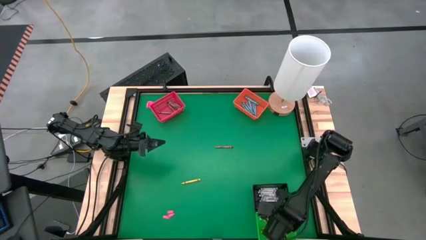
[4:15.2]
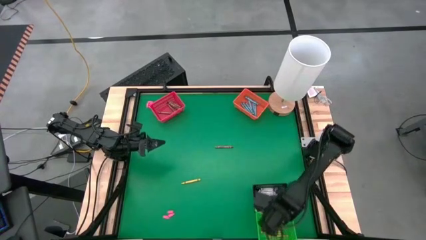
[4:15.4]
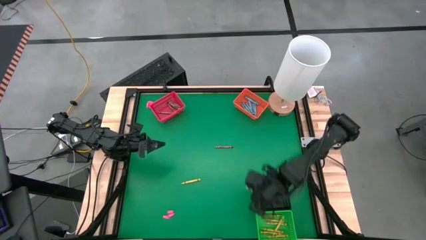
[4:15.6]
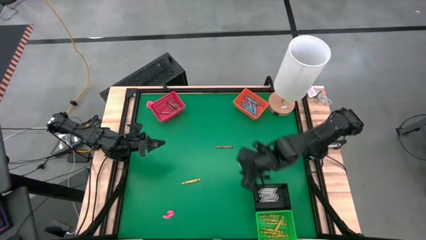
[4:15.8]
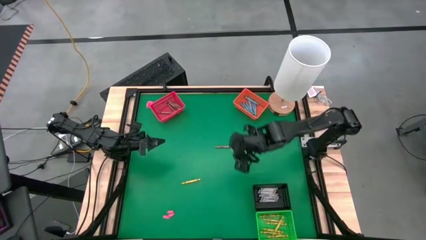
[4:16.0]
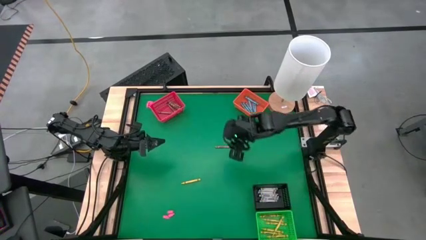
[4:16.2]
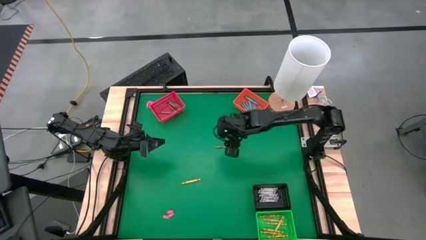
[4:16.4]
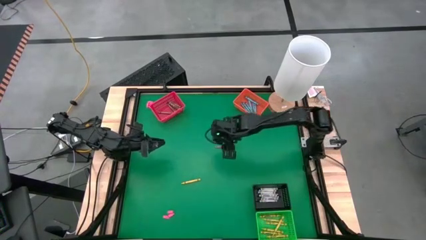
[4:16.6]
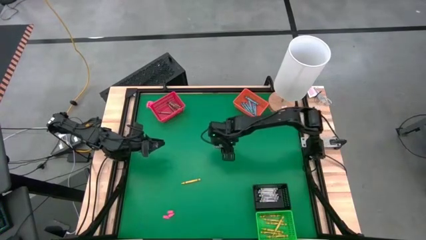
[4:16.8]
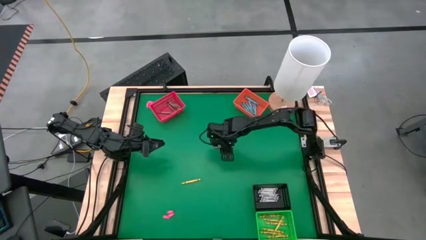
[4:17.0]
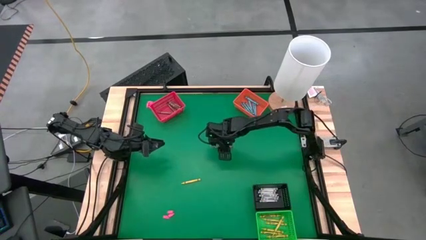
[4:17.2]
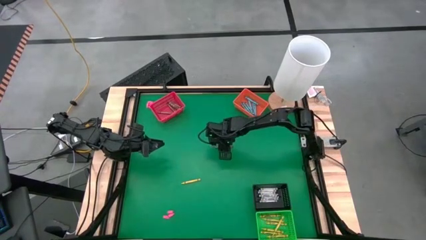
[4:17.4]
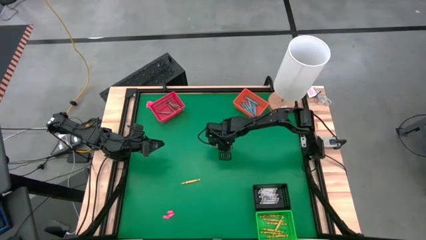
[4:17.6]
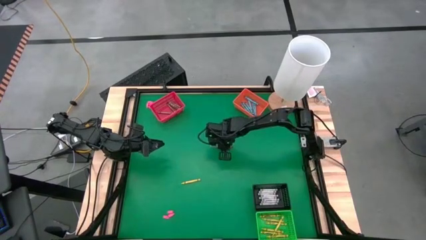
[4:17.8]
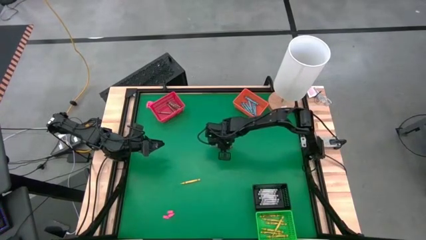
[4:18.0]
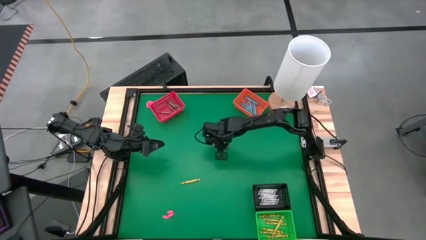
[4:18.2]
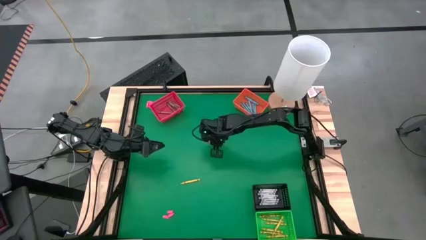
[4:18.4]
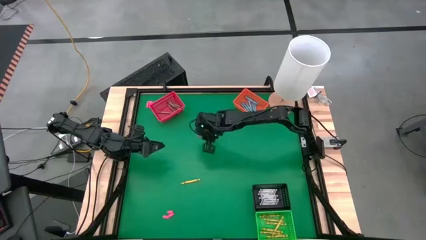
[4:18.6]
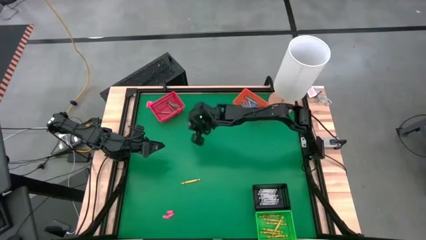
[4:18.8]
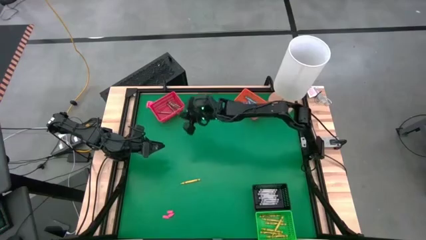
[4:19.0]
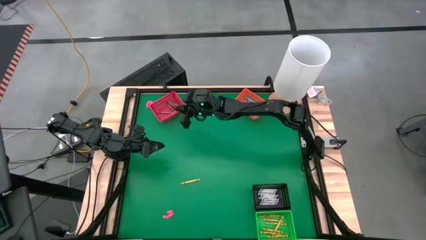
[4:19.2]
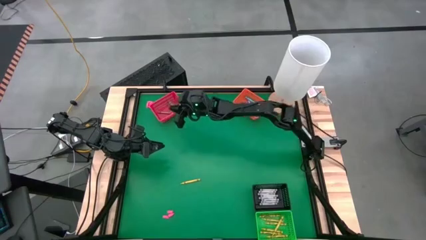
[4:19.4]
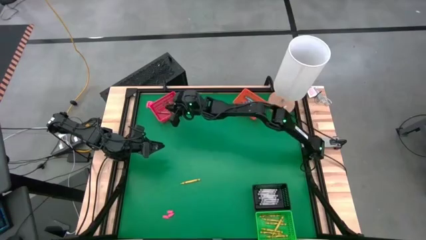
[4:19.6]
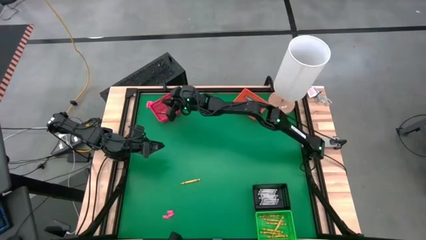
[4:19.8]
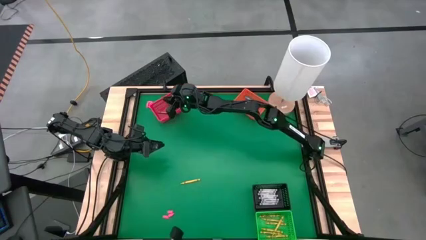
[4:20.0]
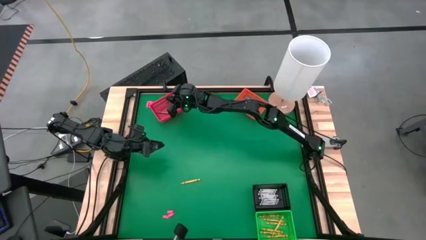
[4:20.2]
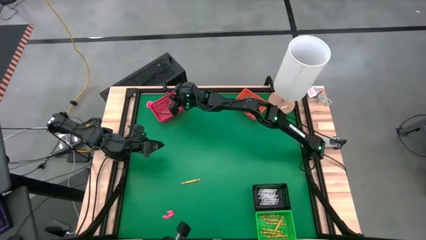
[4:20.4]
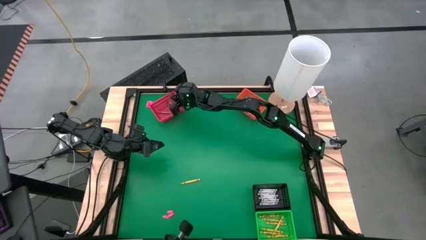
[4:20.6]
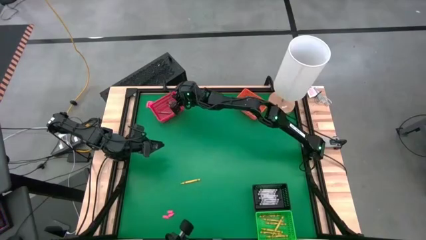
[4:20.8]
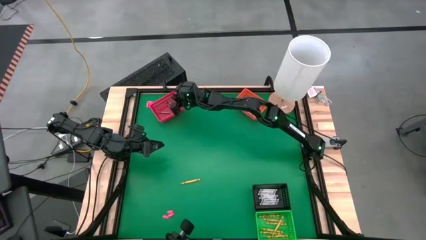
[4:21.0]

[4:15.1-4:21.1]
Task: Sort crayons
Put the brown crayon into the red bin

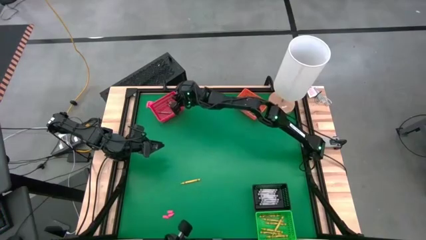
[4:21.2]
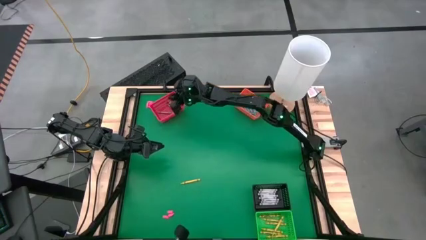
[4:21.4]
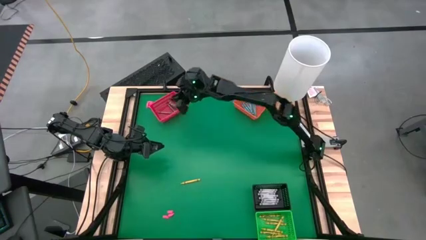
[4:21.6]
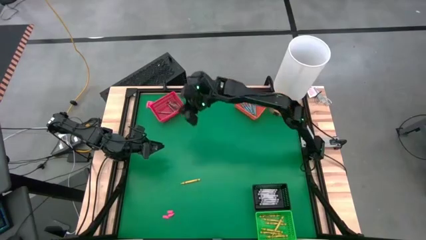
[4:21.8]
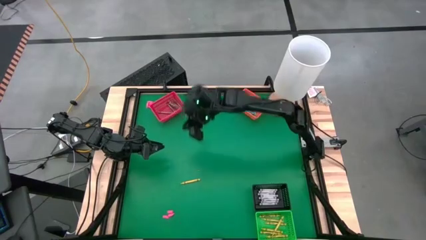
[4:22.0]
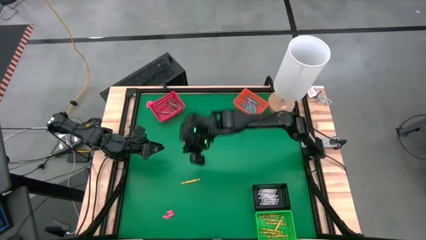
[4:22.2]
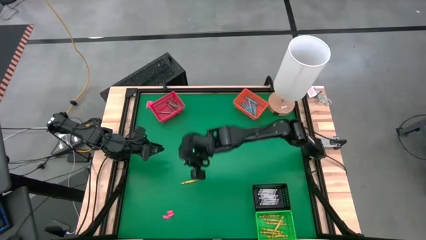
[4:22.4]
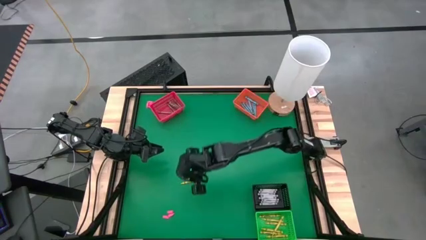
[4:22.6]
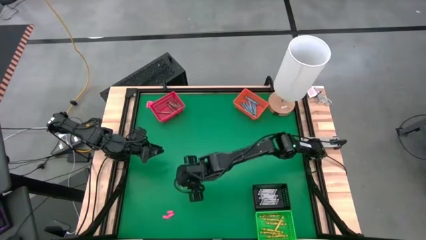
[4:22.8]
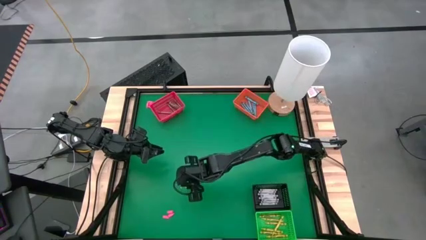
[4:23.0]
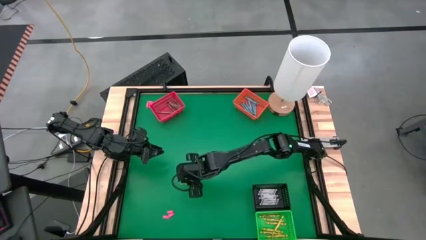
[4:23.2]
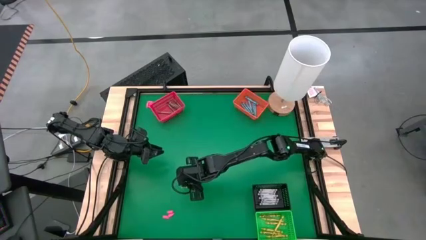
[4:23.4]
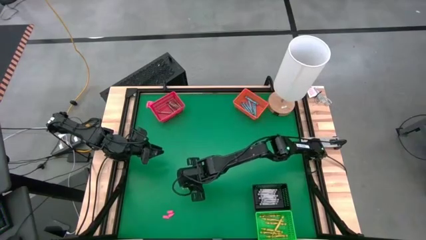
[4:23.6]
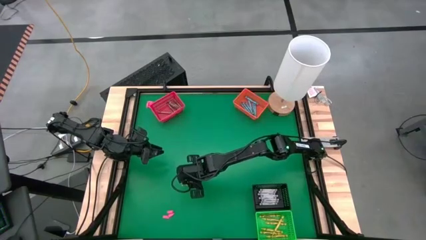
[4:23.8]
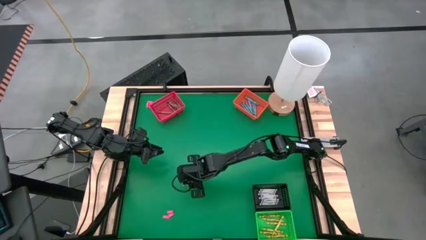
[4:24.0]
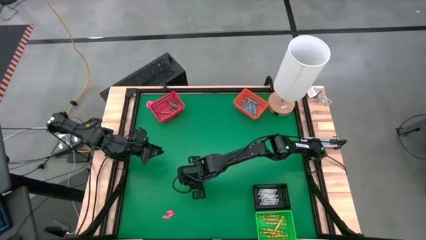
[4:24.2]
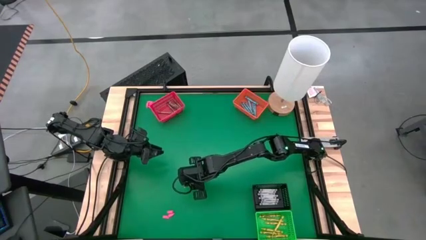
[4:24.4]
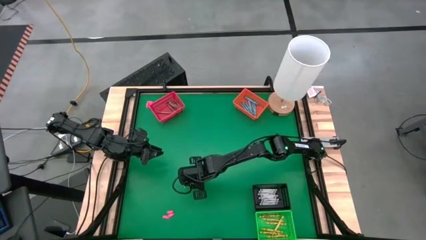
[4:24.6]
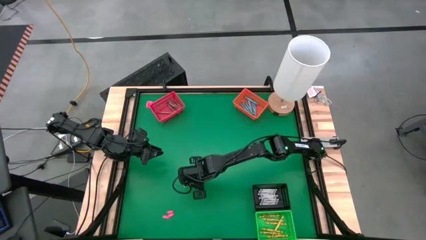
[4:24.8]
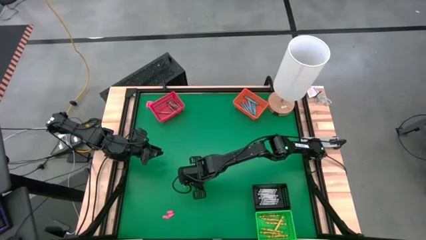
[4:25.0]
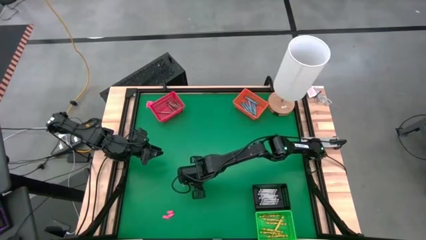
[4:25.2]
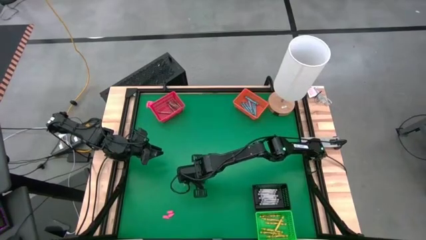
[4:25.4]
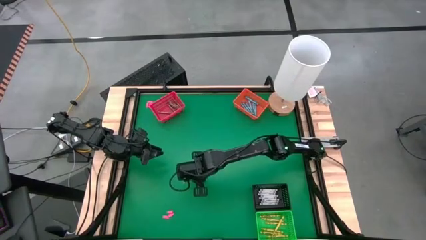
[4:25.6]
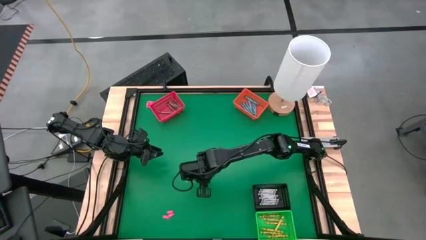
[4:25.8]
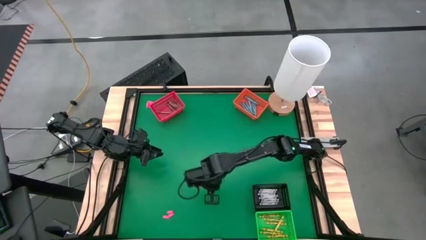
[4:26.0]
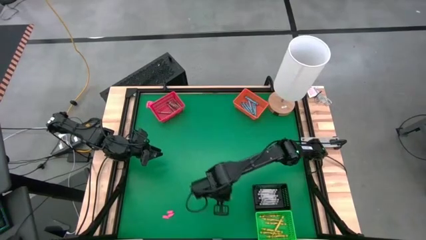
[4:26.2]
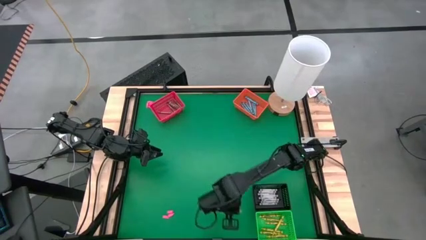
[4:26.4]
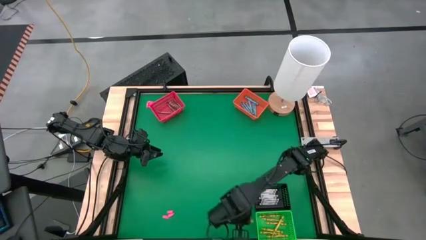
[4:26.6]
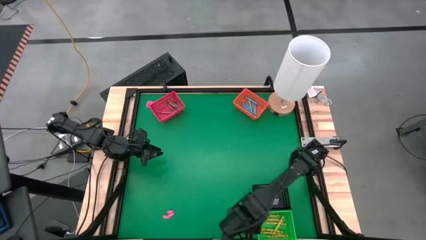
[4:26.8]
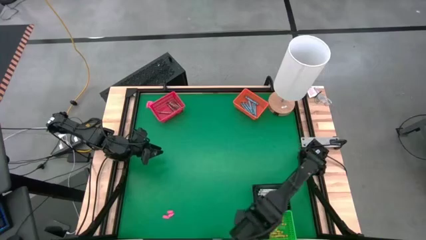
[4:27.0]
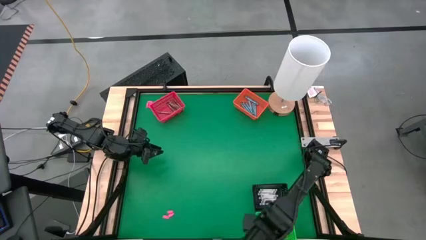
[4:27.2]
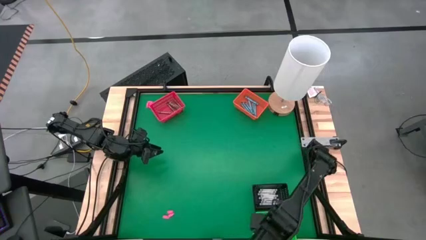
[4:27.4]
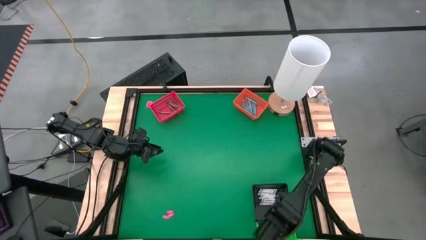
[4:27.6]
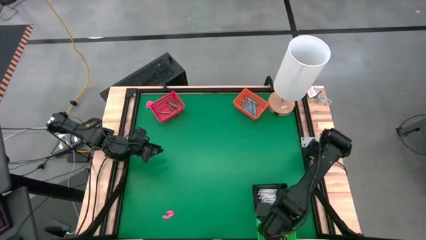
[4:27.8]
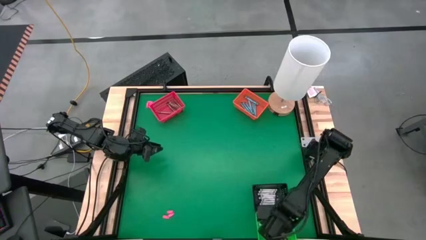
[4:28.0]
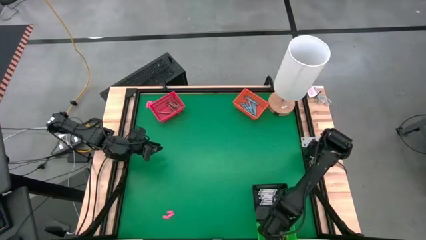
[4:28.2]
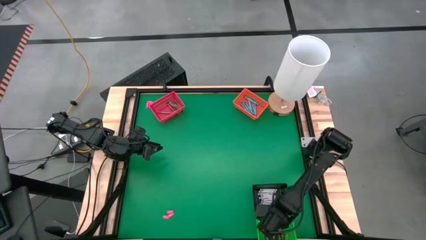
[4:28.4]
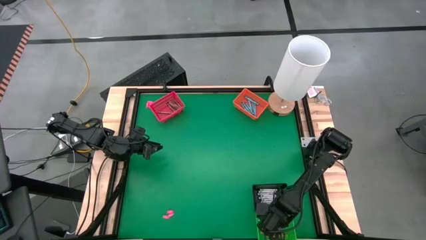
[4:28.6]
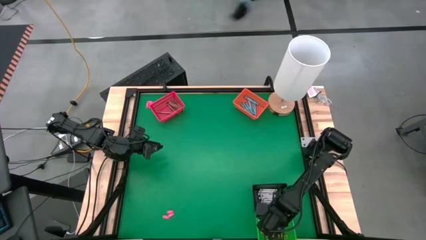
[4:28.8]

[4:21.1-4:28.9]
Put the yellow crayon into the green bin
